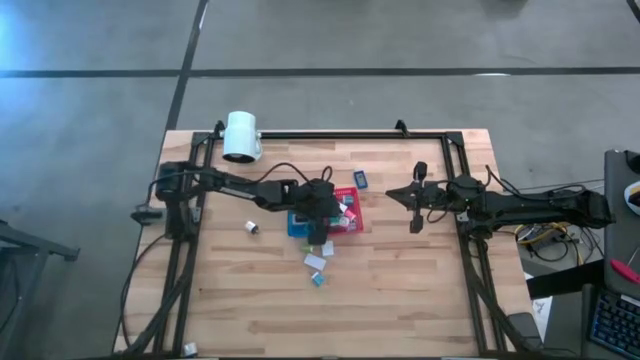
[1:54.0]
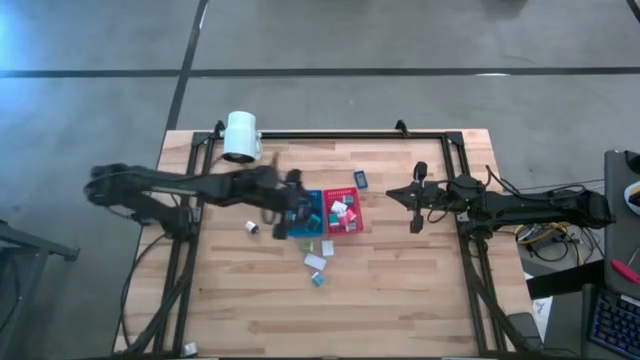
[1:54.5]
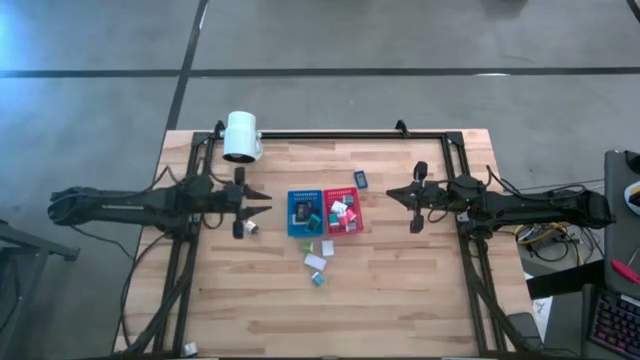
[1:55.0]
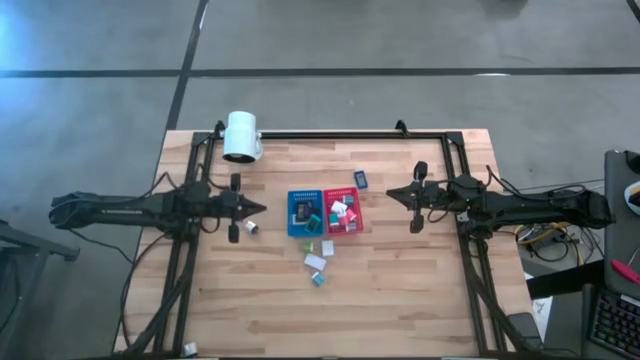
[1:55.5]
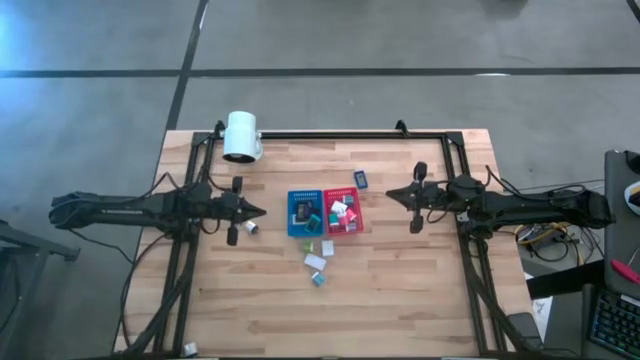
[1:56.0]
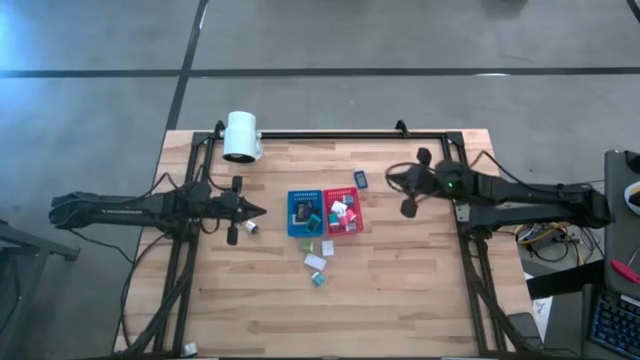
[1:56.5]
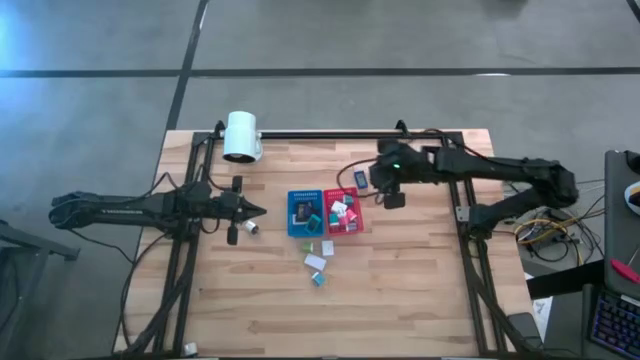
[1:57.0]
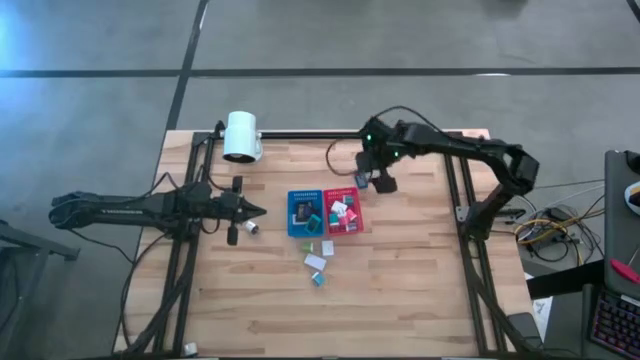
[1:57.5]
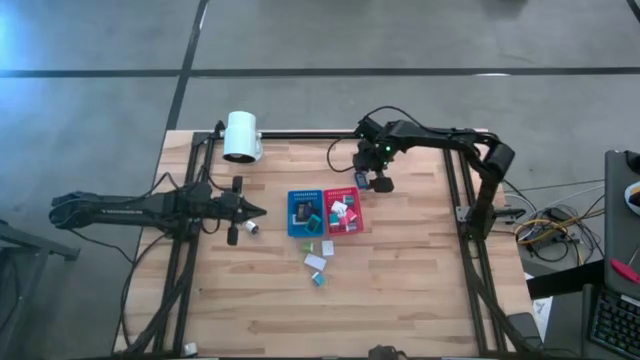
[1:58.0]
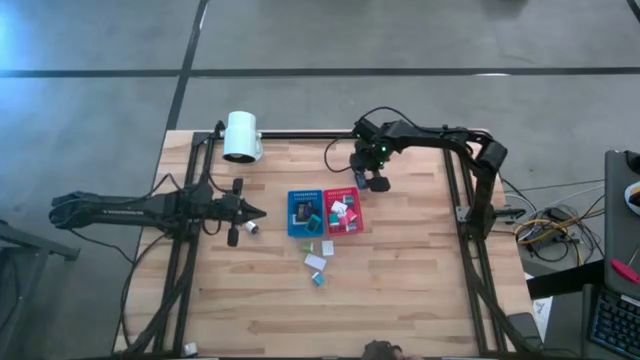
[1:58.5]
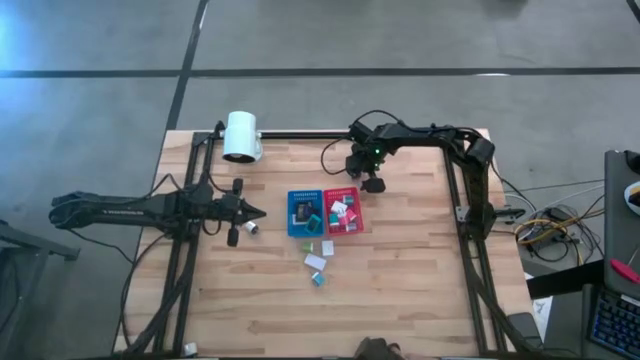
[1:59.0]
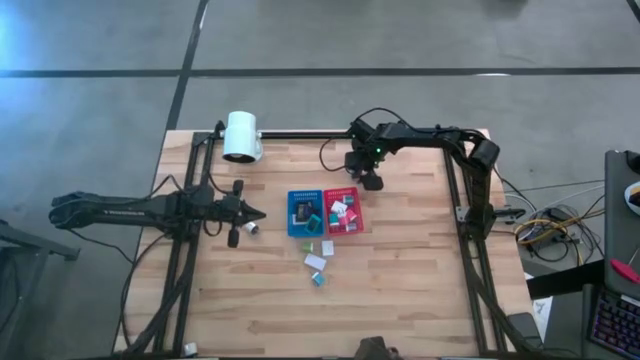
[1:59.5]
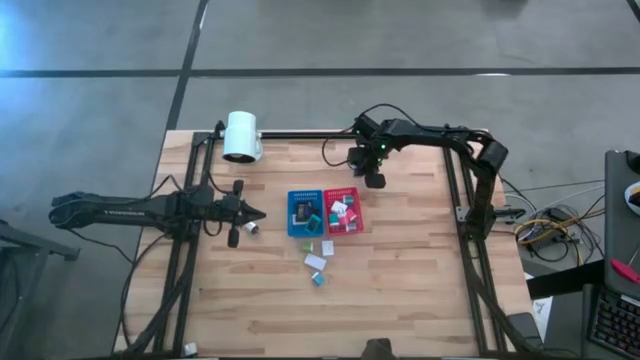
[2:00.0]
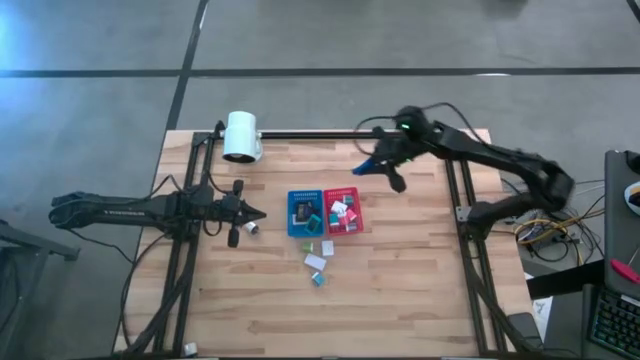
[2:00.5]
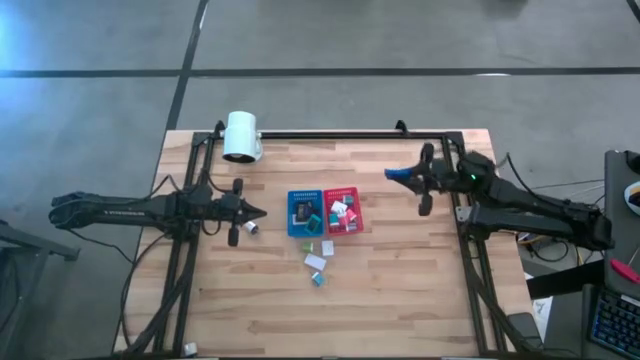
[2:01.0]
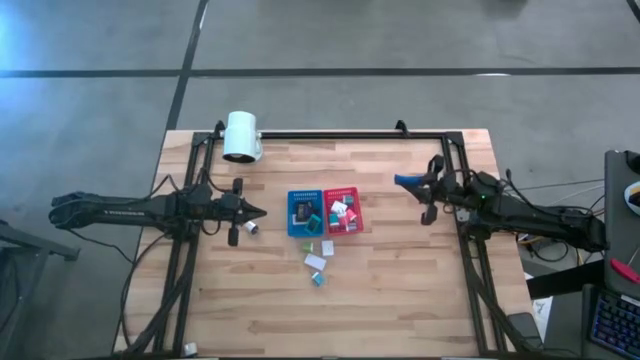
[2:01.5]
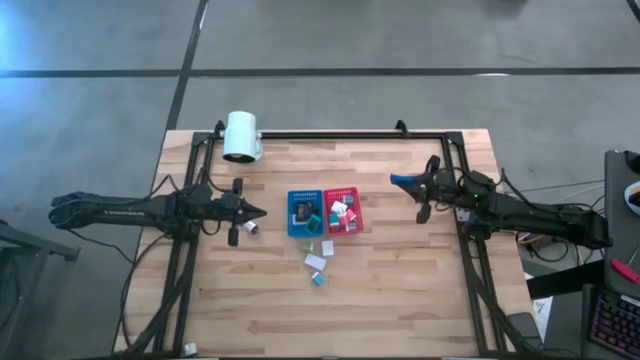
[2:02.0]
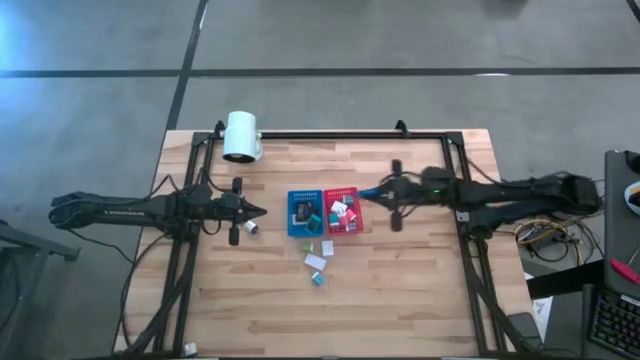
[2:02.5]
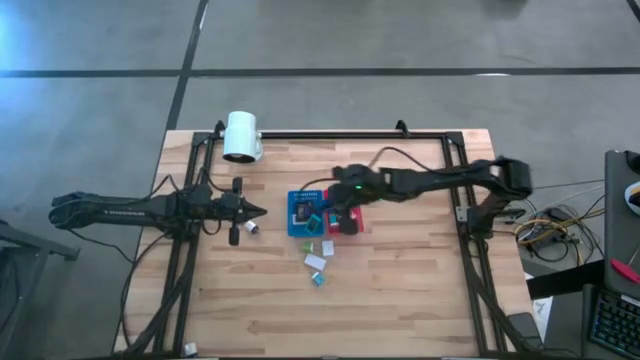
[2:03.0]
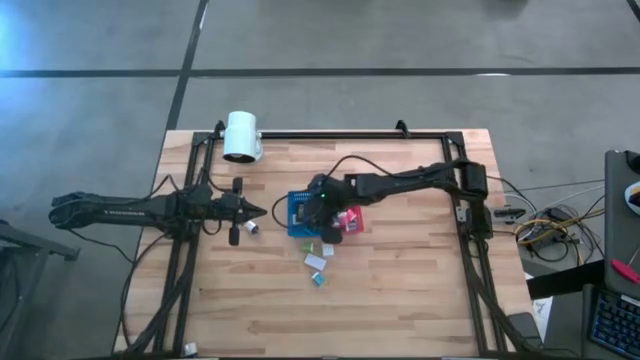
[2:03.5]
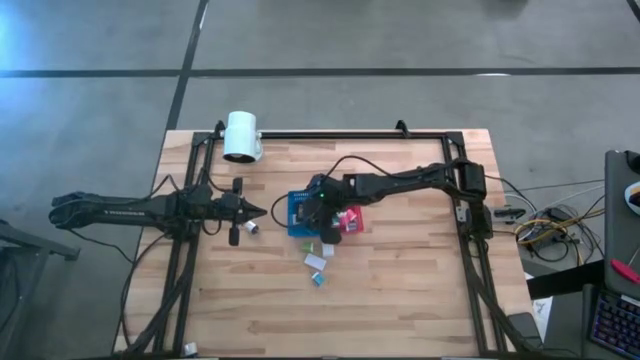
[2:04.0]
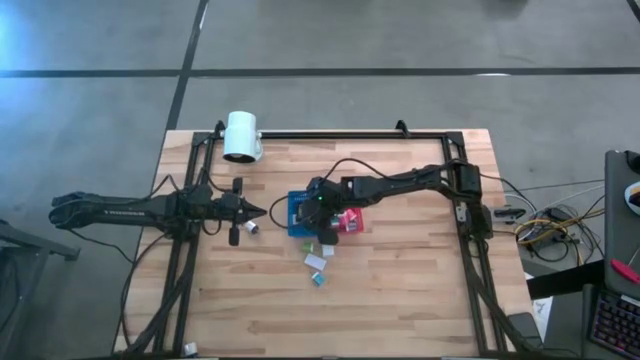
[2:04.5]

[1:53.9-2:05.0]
Task: Pick & Place Office items
Put the blue digital timer into the blue bin

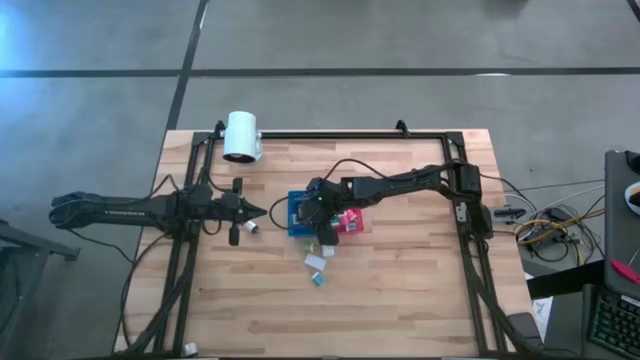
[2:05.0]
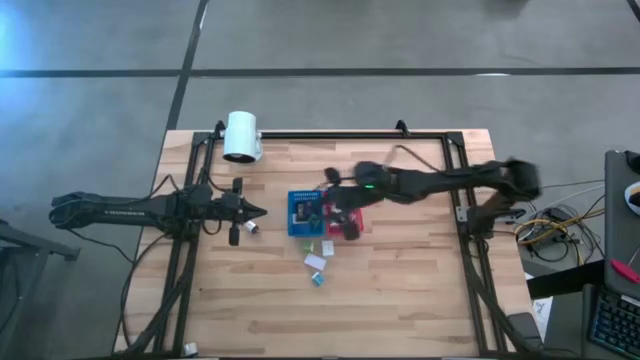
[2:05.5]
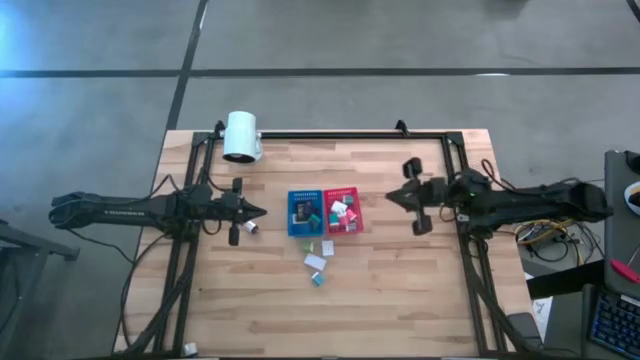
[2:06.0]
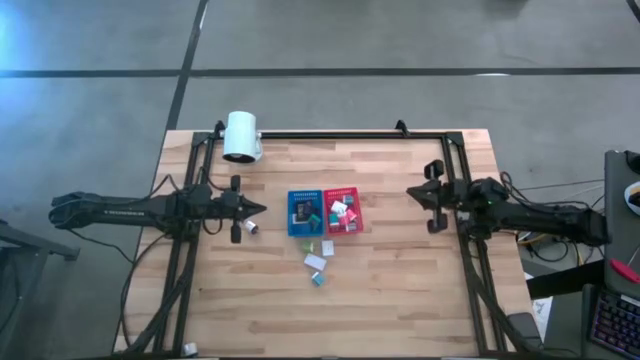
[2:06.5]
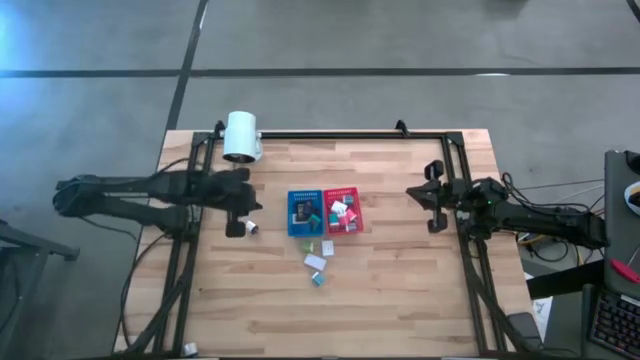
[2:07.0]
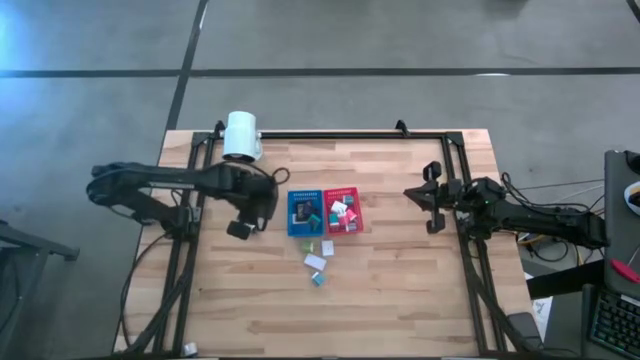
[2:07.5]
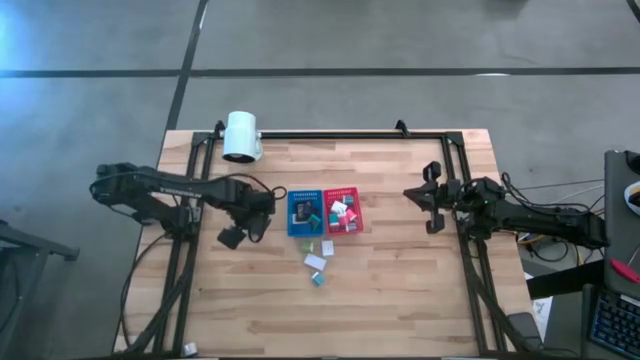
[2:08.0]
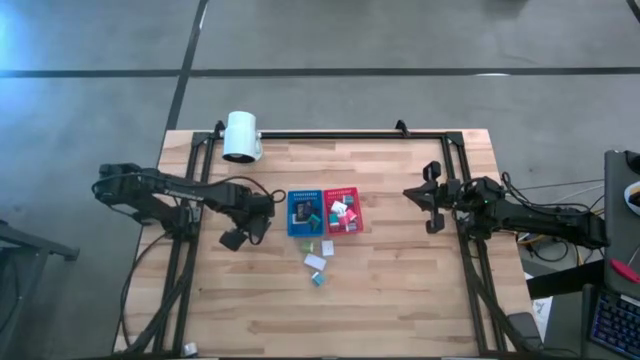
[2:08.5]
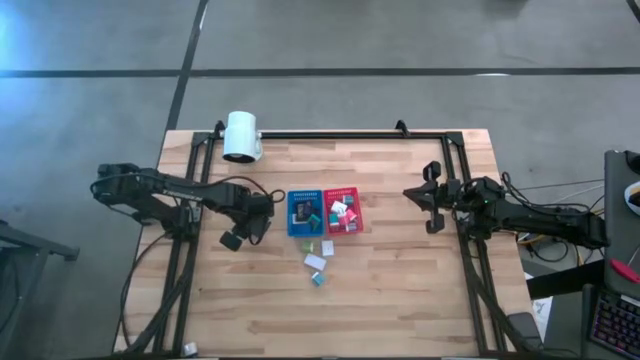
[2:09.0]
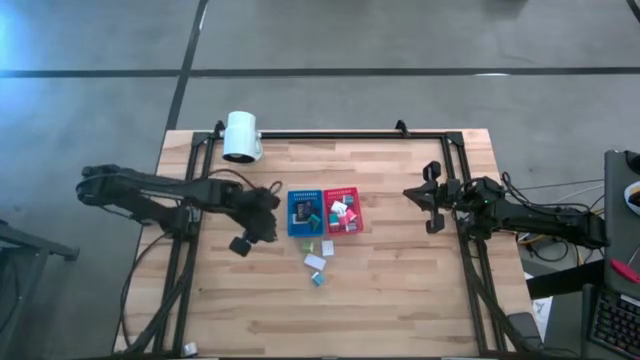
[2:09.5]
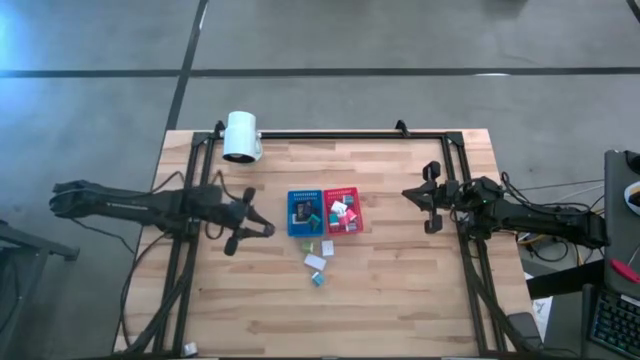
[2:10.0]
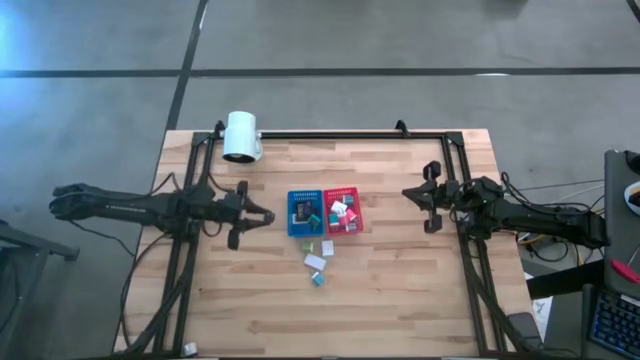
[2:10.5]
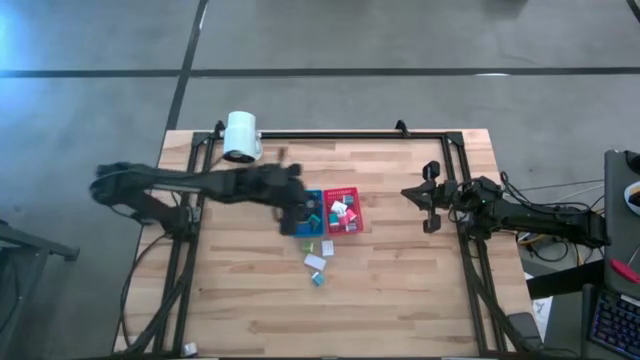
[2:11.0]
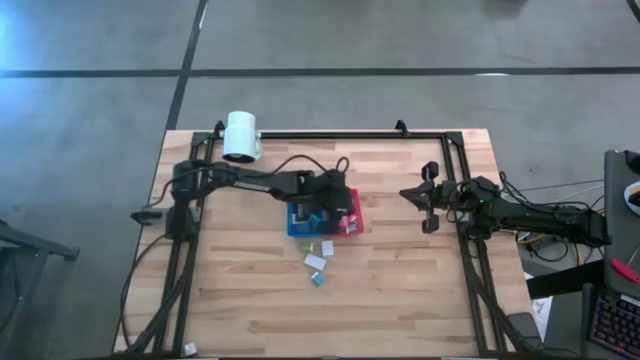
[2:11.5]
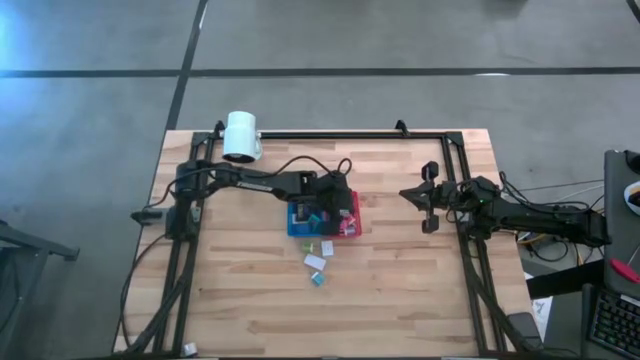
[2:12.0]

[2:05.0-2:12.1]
Put the white black charger adapter into the red bin

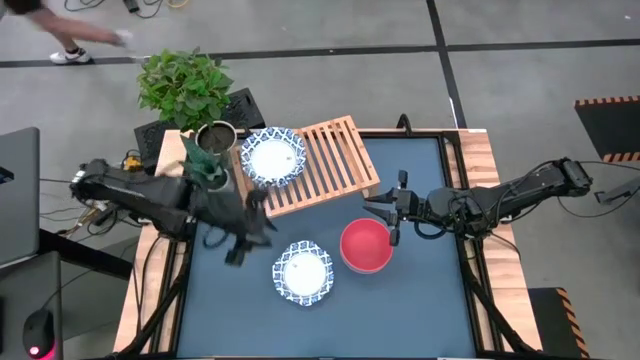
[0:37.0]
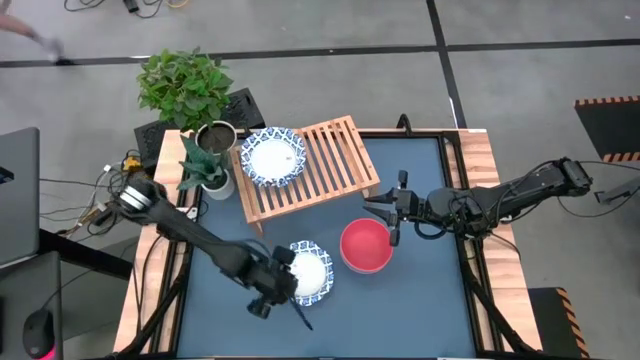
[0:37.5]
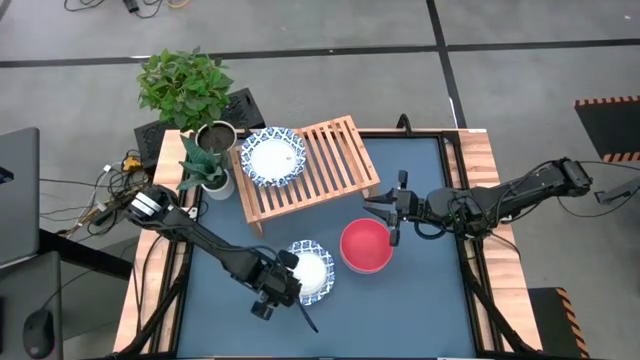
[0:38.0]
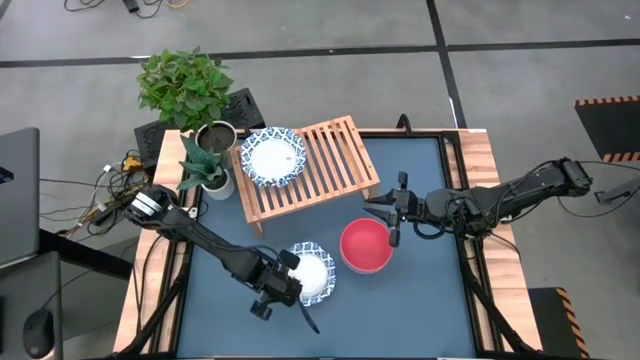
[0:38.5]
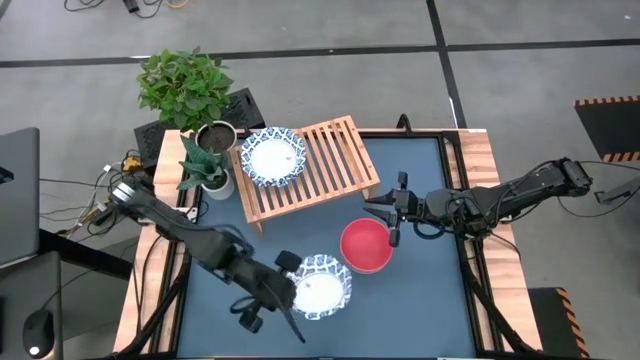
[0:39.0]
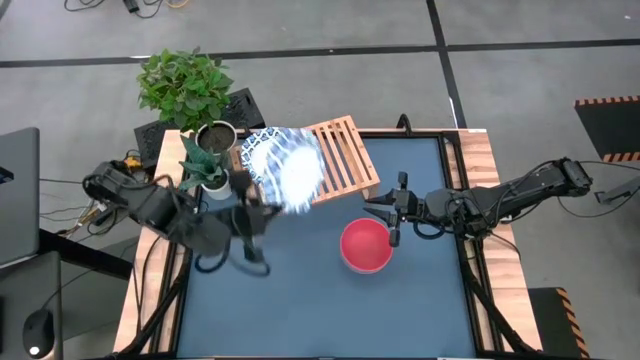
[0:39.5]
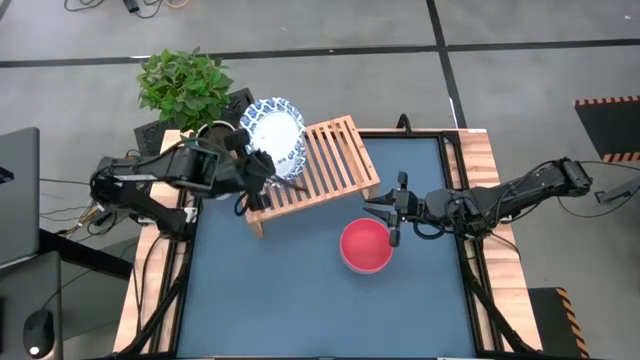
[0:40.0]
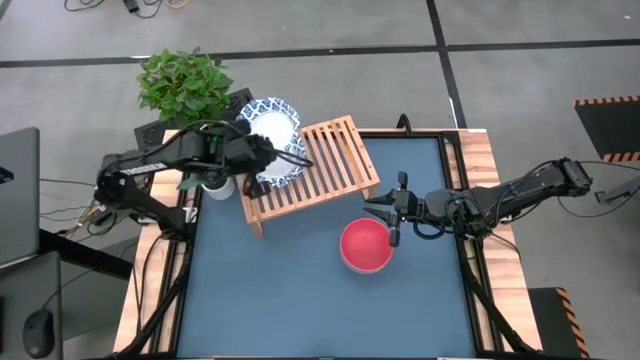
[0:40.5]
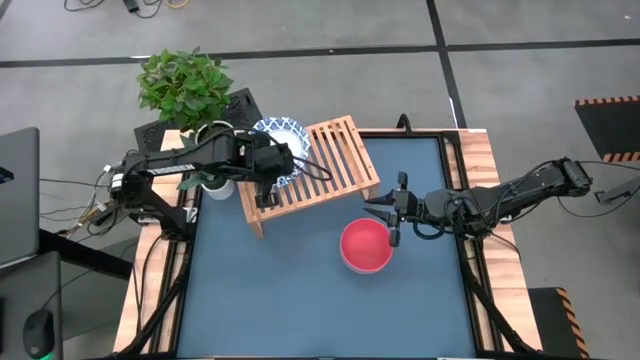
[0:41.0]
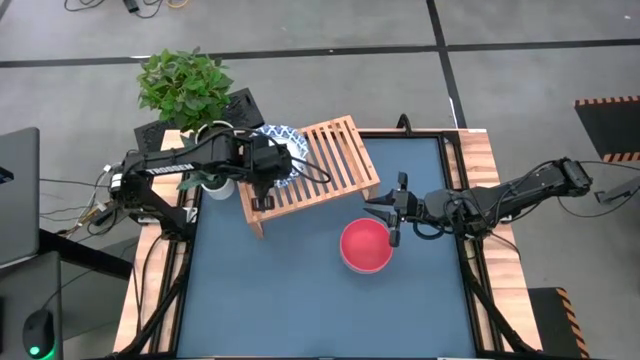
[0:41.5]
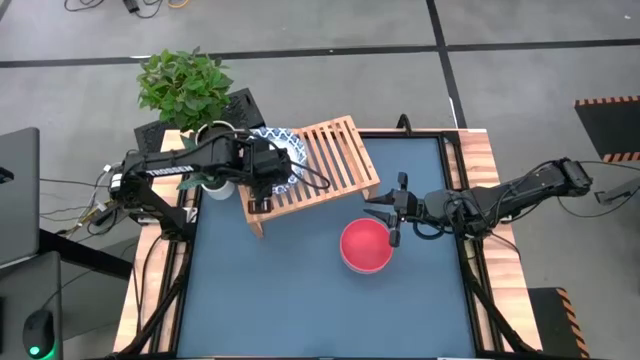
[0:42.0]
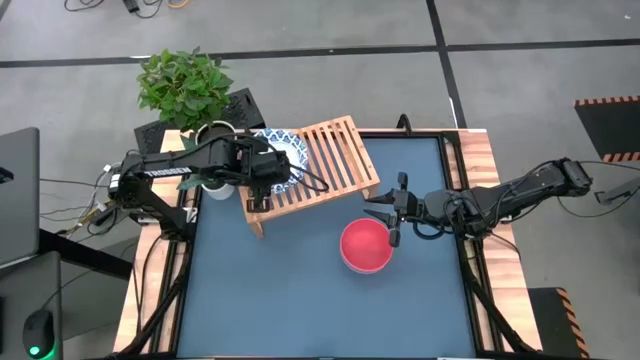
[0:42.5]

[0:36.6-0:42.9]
Task: Place and stack bowls onto a shelf
Stack the blue patterned bowl on top of the blue patterned bowl on the shelf
